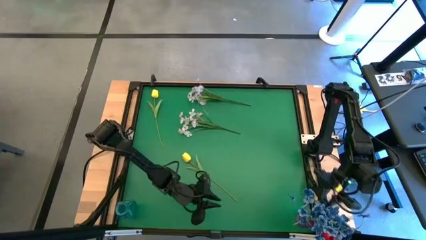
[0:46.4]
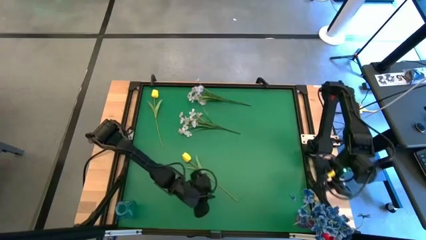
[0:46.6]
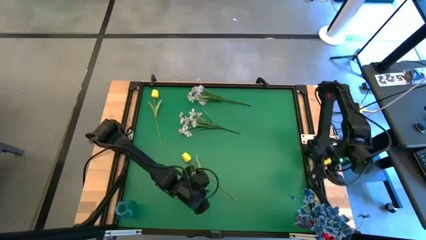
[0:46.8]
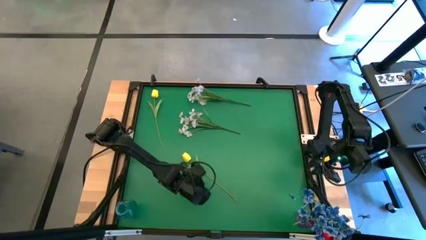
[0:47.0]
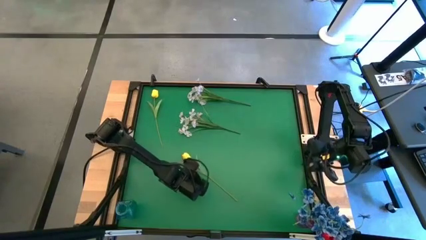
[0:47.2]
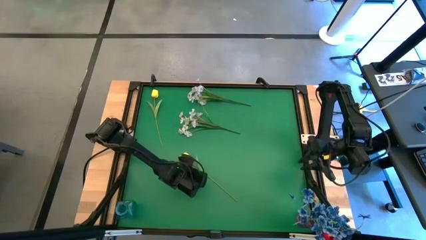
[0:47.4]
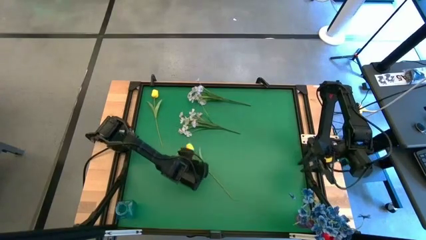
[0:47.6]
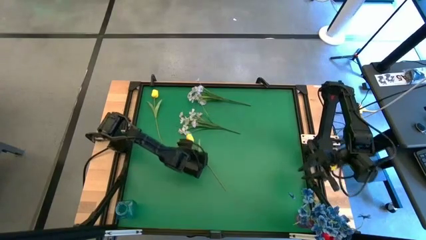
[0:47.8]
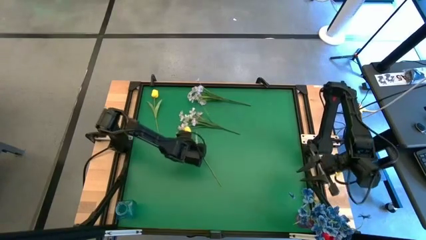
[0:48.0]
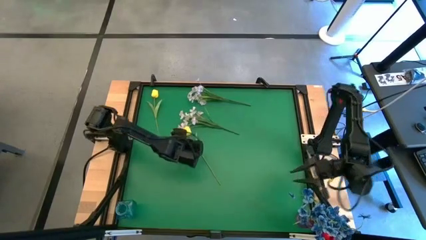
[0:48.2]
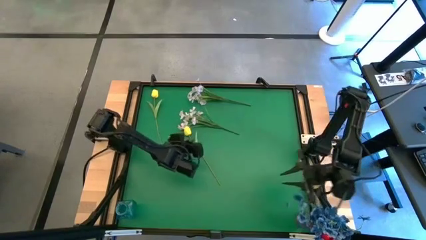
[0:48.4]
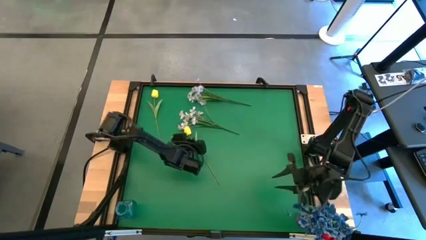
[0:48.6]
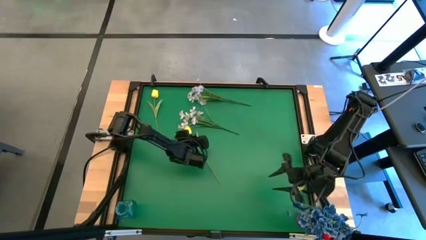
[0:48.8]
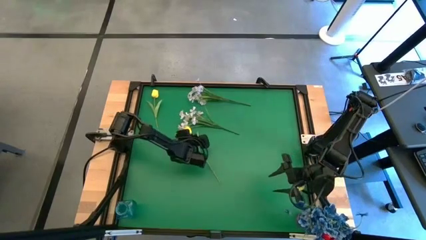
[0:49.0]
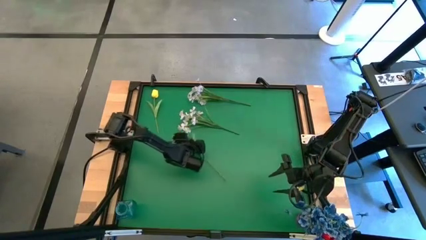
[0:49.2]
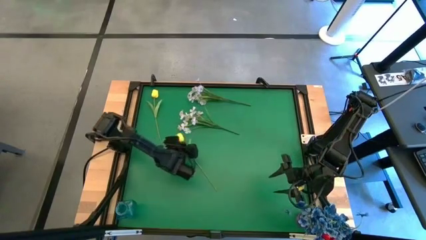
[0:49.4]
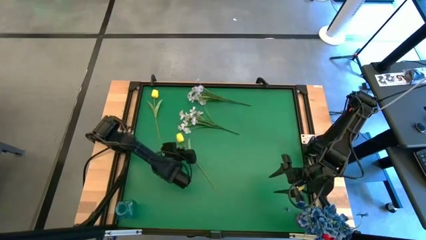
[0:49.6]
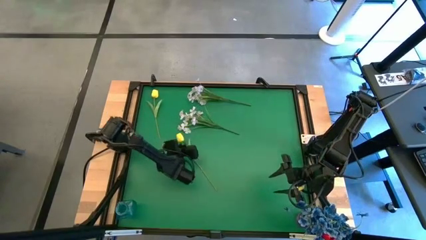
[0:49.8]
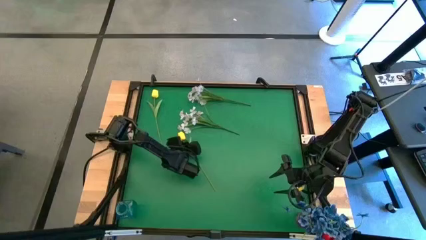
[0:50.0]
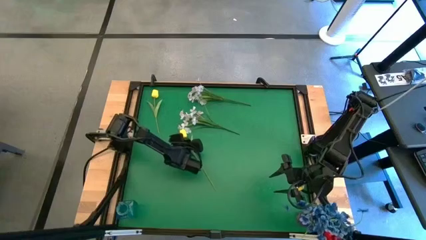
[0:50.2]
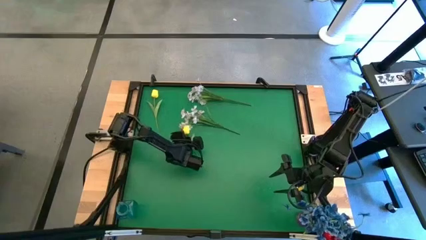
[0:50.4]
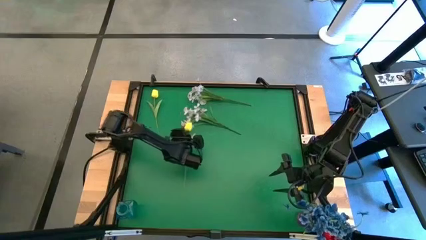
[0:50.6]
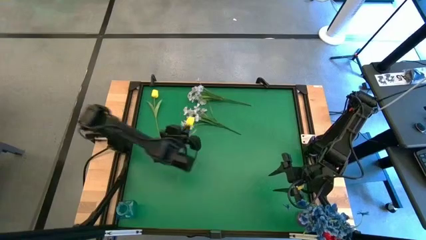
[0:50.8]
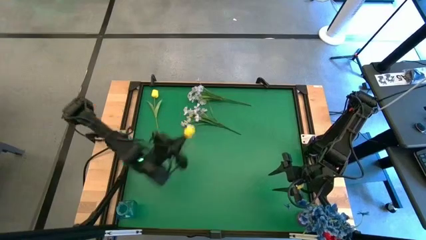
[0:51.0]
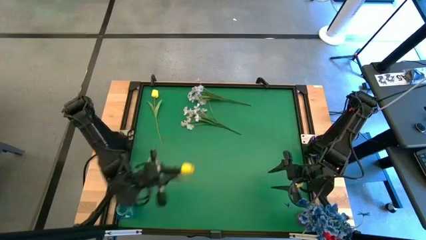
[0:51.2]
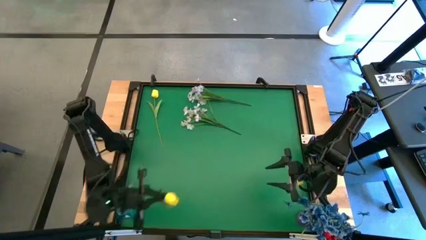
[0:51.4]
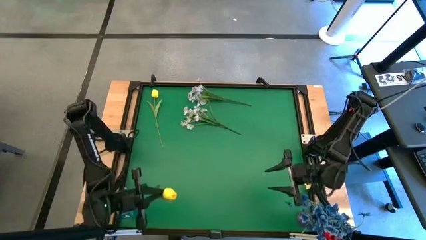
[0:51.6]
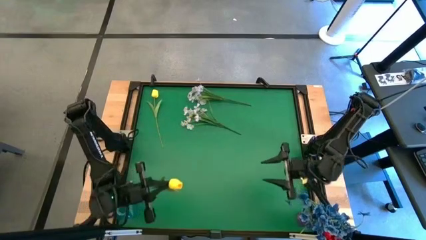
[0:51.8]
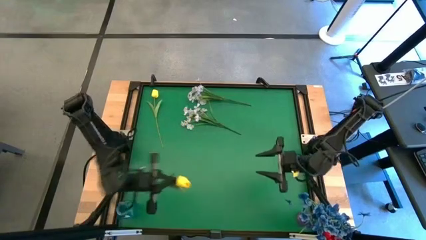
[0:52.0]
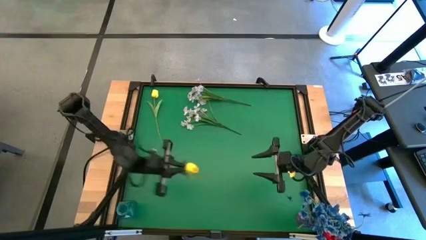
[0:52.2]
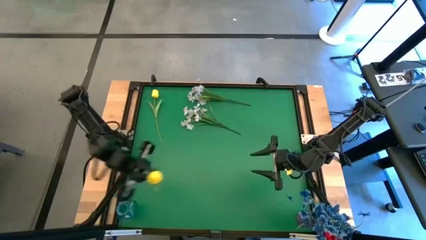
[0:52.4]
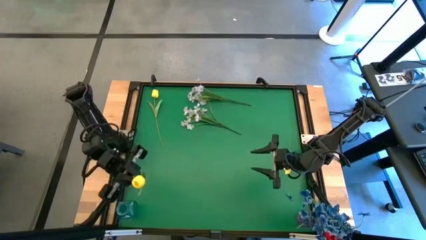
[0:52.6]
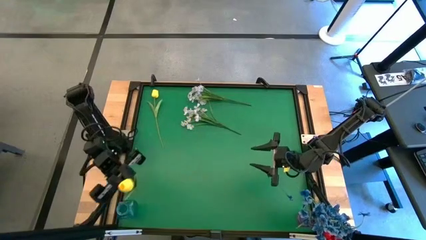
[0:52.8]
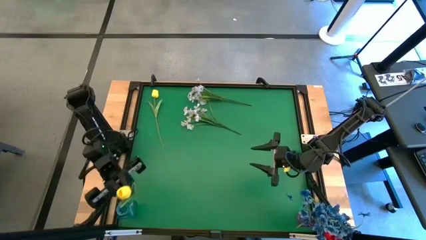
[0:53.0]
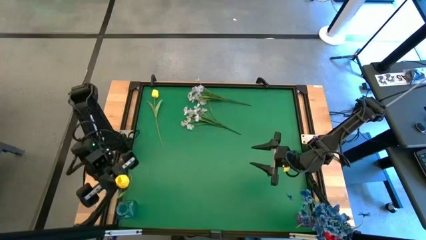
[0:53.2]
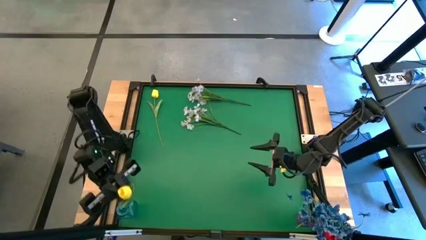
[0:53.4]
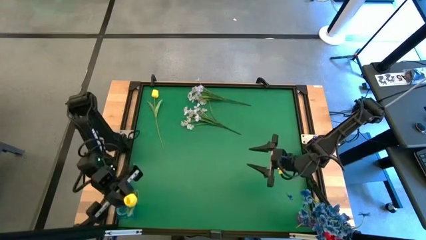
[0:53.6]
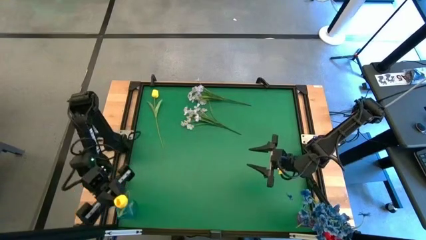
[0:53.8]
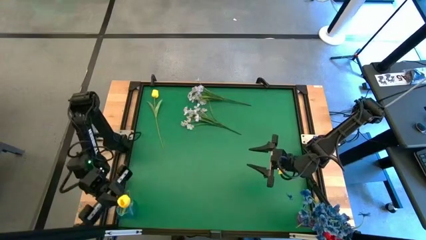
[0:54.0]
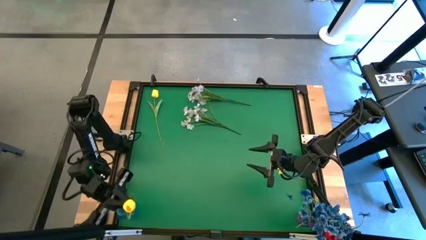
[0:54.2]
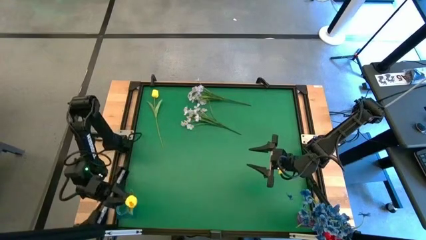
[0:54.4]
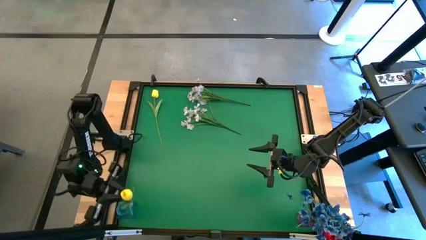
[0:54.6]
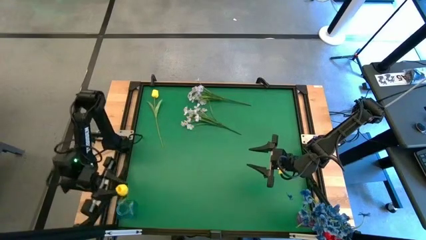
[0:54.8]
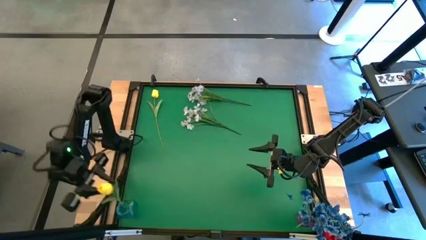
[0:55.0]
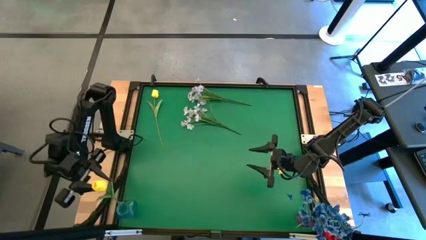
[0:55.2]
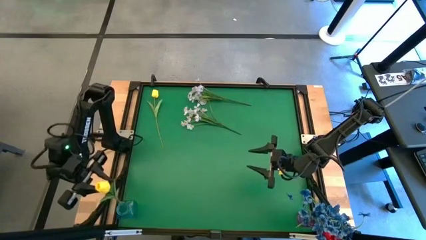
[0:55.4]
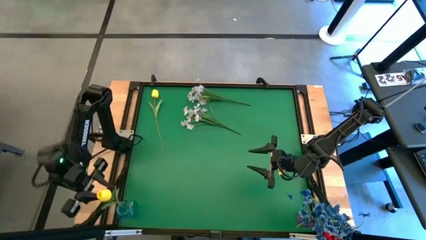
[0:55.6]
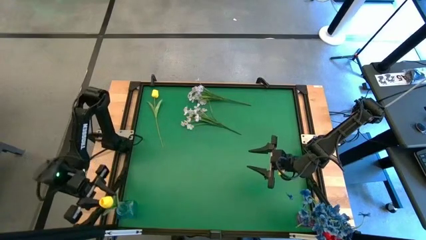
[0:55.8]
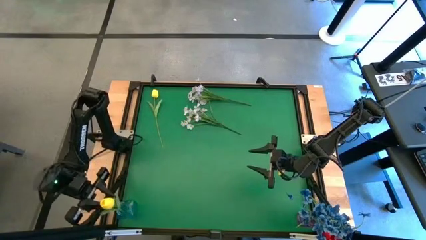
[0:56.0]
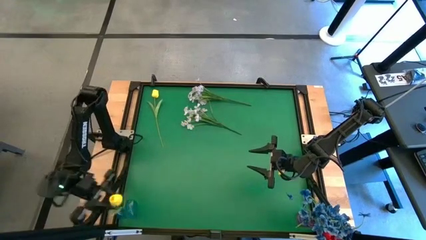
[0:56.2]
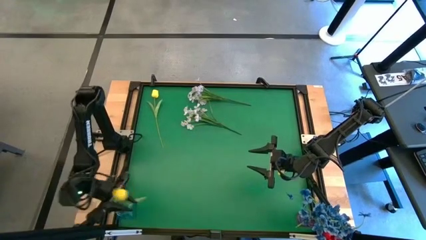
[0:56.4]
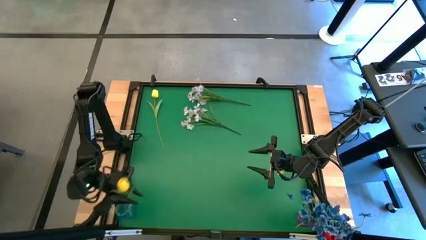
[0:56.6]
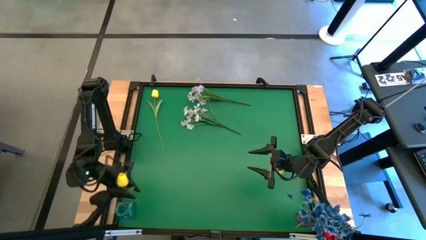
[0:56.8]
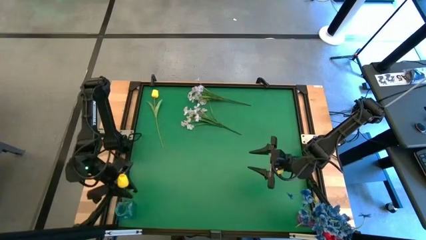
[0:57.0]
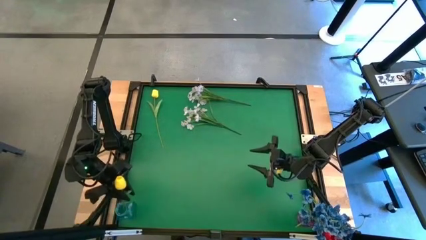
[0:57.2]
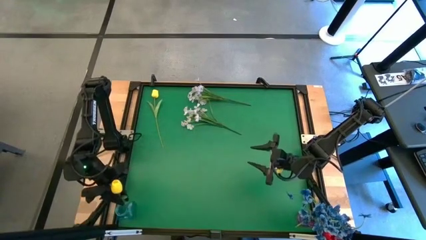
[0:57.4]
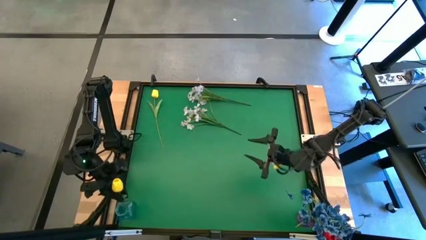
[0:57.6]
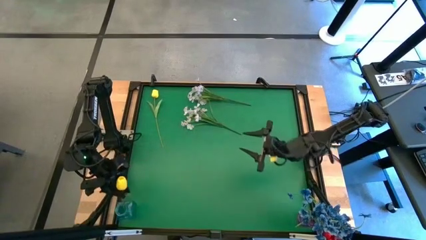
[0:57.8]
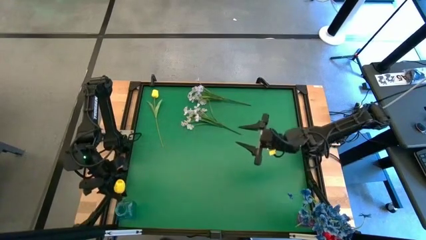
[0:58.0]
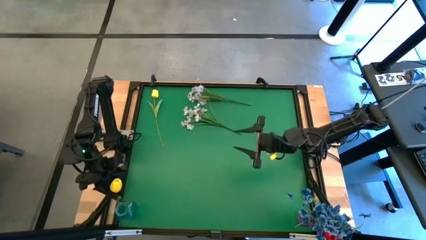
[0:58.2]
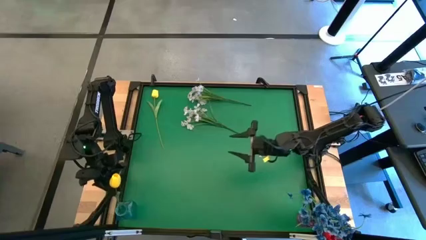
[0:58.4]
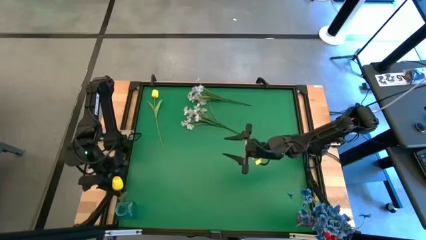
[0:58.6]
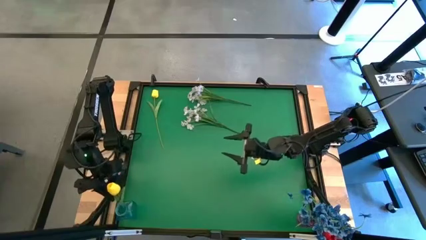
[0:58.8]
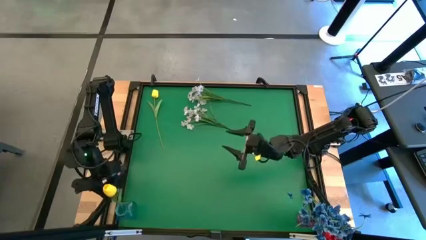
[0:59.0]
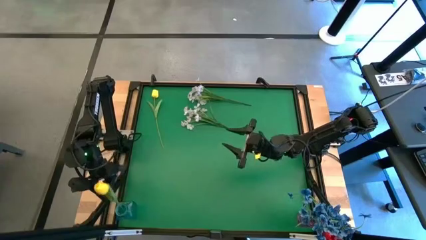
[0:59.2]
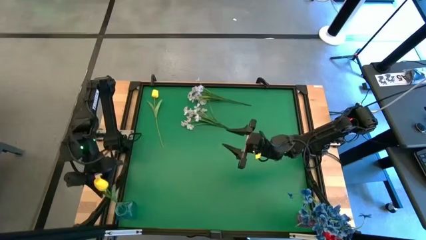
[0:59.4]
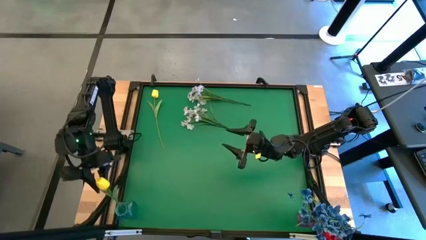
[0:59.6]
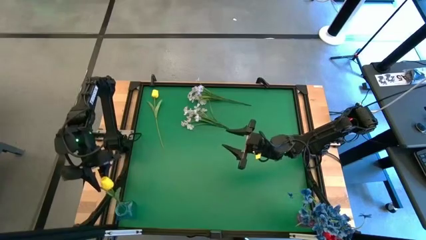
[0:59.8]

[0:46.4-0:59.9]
Task: Sort flowers into vase by color
Put the bottom yellow flower into the blue vase
